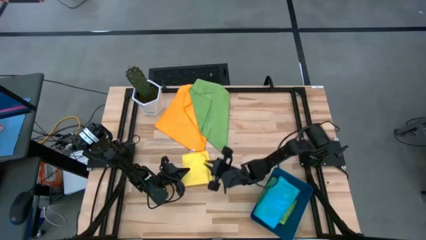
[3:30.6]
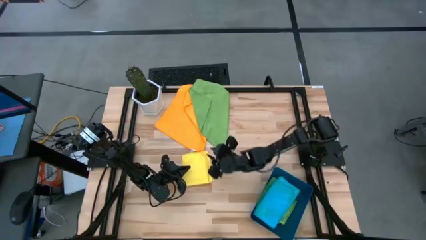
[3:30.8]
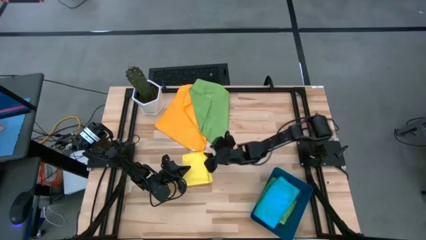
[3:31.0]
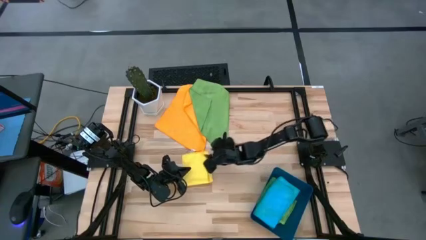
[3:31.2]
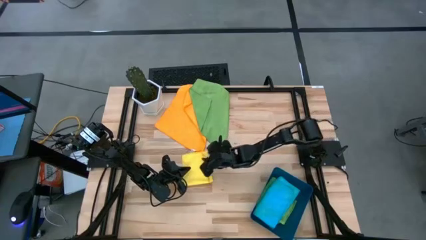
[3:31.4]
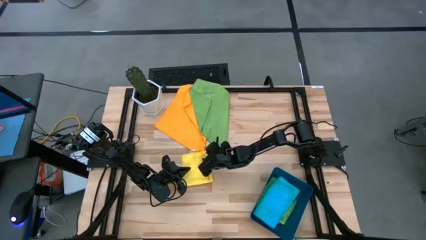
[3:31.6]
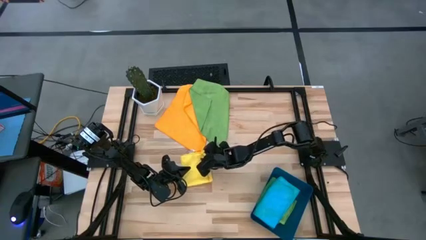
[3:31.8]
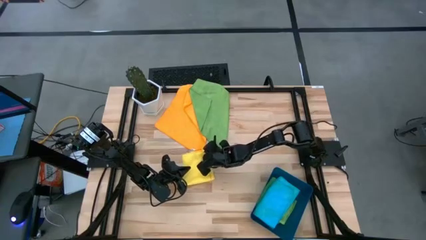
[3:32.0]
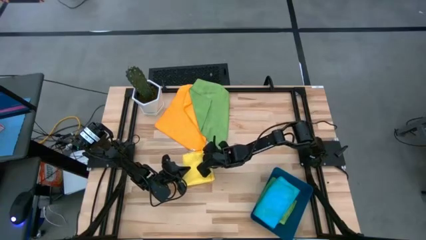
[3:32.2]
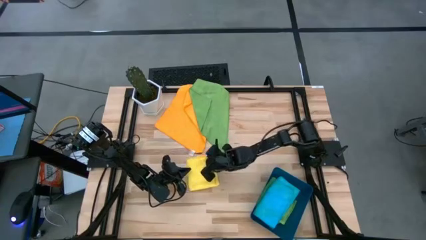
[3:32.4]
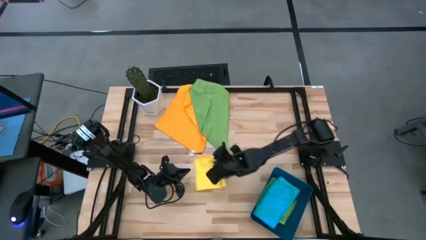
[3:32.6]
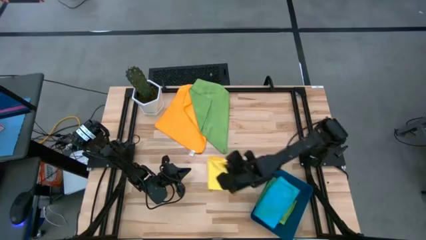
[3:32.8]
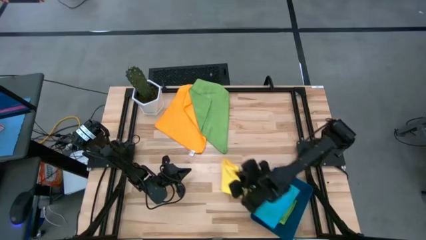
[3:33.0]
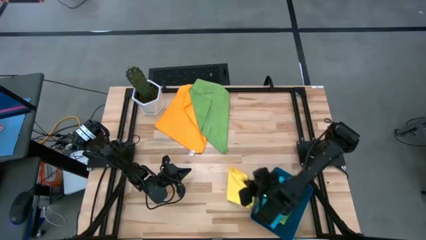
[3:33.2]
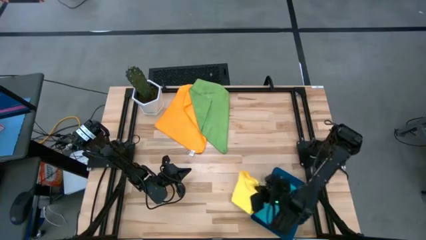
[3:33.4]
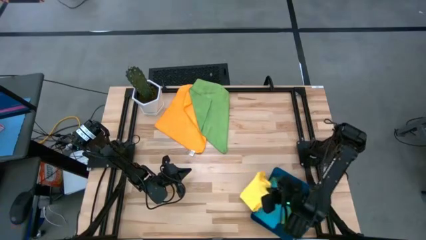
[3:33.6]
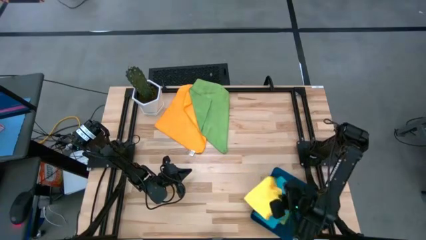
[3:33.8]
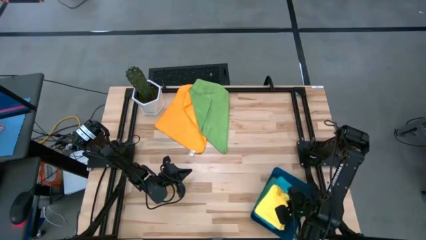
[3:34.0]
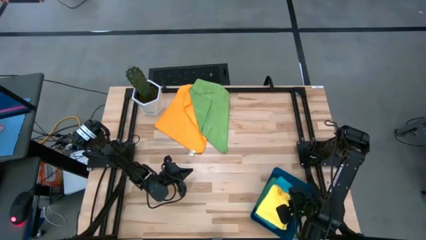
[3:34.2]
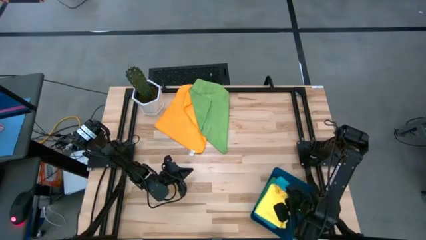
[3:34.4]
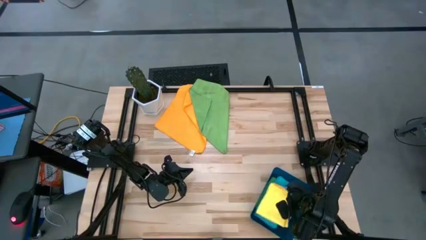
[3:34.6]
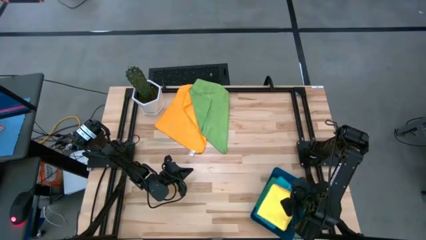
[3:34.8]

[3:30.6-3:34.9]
Task: Fold microfiber towels
Put the folded yellow microfiber towel into the blue bin

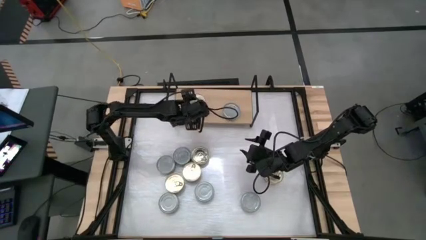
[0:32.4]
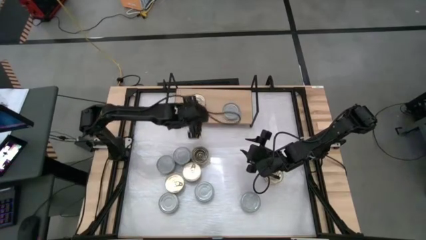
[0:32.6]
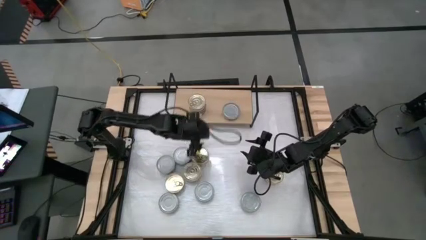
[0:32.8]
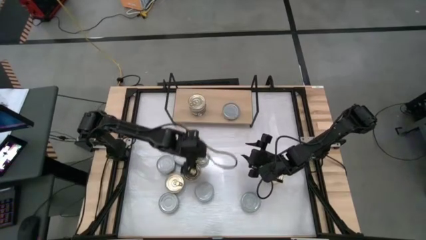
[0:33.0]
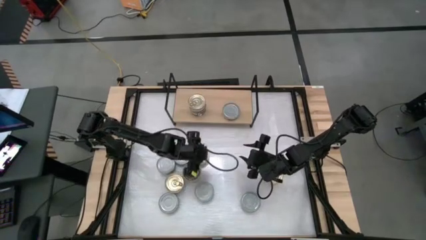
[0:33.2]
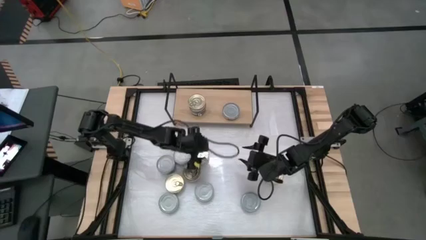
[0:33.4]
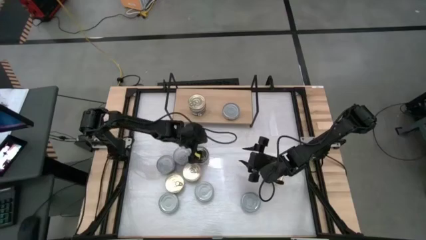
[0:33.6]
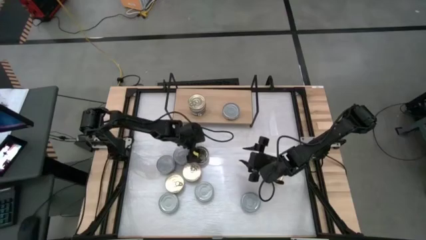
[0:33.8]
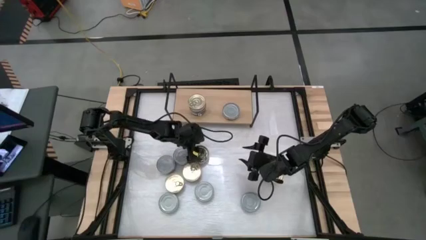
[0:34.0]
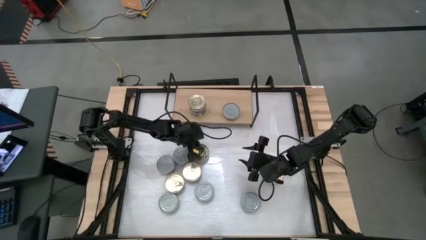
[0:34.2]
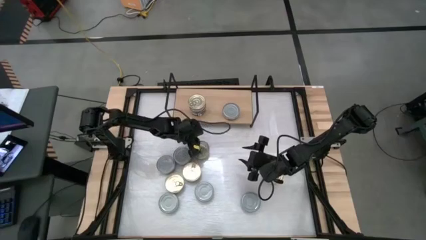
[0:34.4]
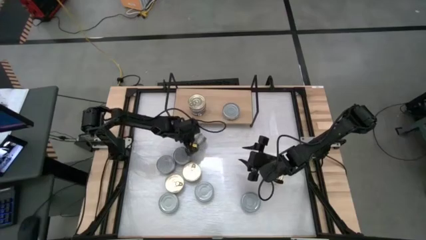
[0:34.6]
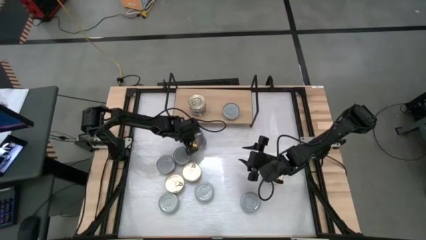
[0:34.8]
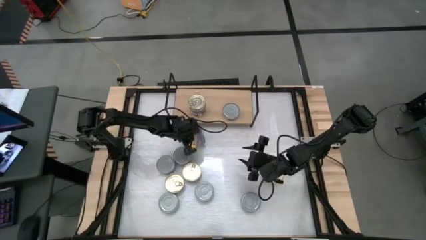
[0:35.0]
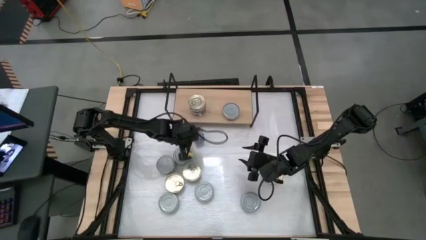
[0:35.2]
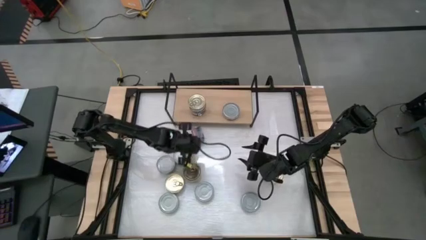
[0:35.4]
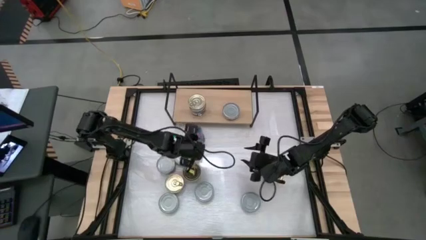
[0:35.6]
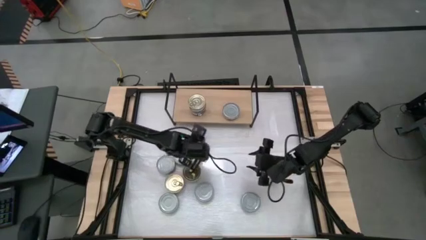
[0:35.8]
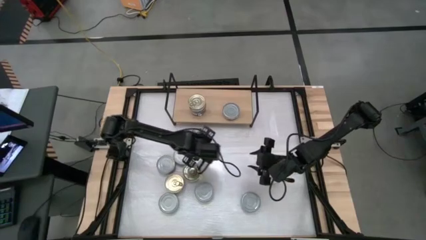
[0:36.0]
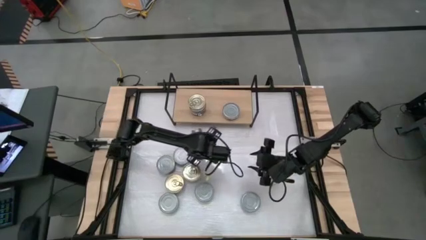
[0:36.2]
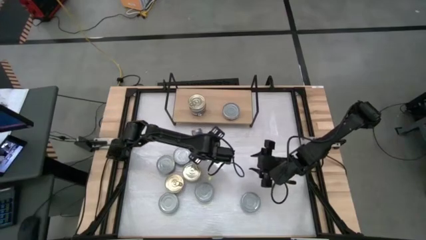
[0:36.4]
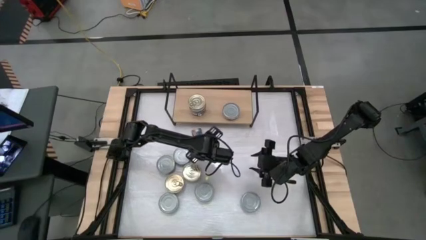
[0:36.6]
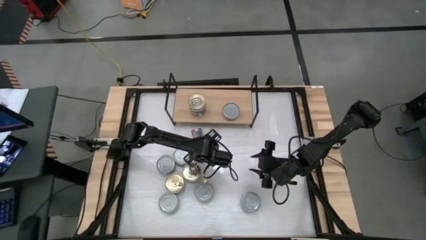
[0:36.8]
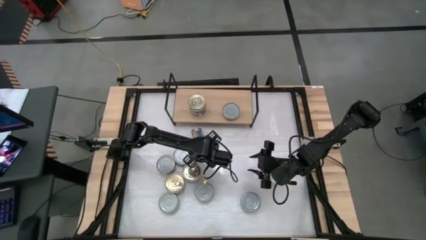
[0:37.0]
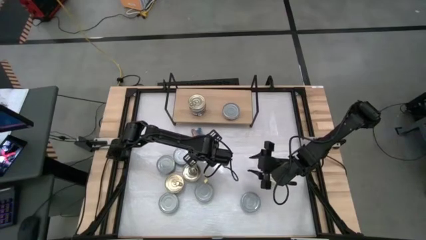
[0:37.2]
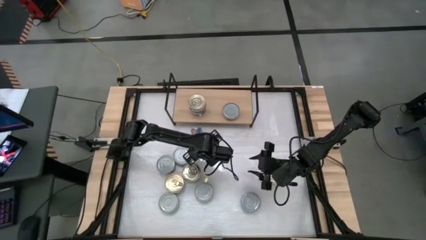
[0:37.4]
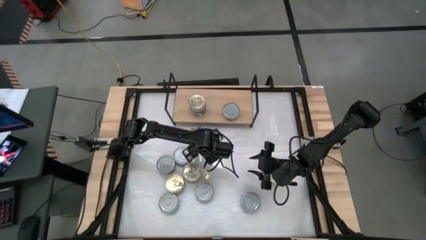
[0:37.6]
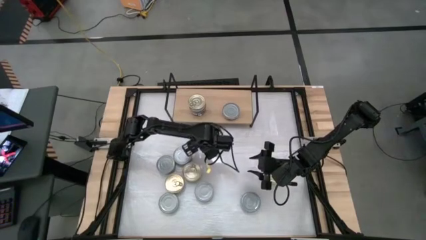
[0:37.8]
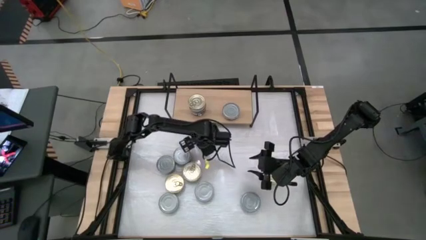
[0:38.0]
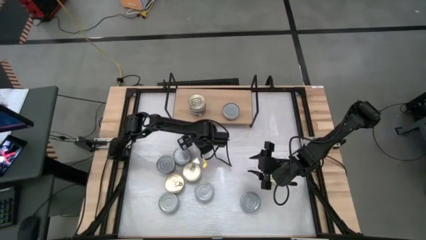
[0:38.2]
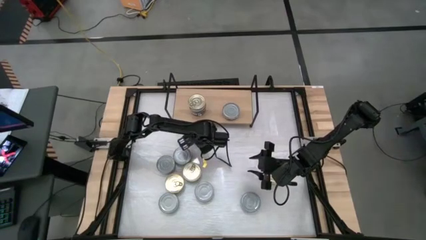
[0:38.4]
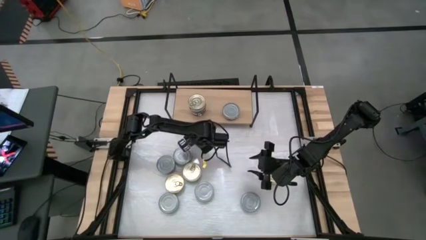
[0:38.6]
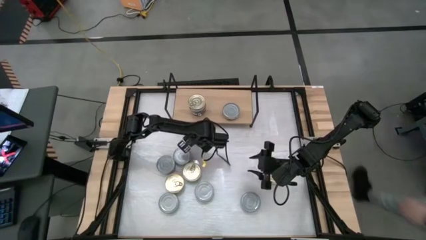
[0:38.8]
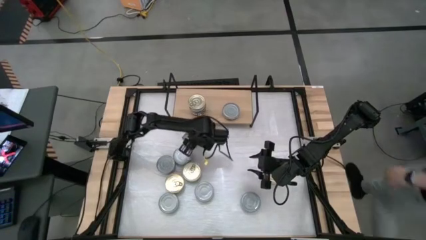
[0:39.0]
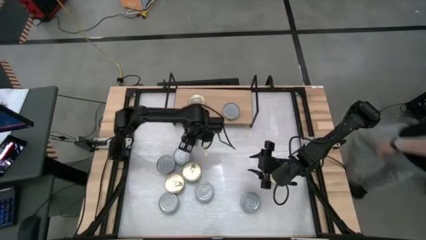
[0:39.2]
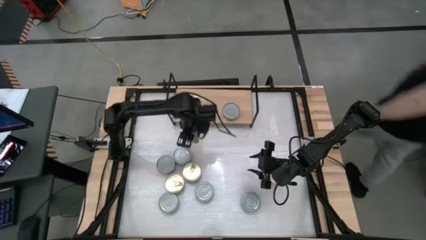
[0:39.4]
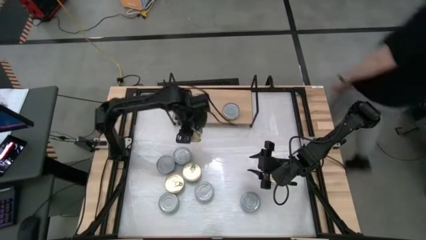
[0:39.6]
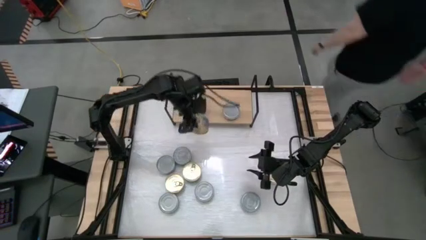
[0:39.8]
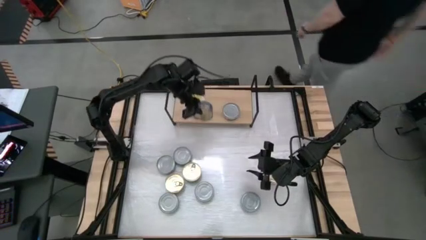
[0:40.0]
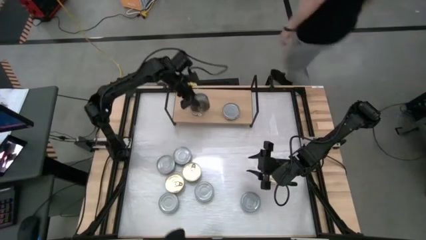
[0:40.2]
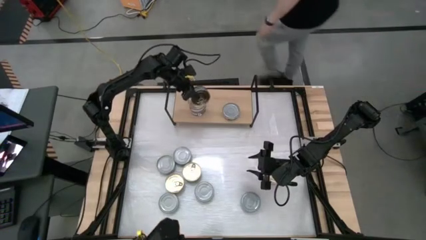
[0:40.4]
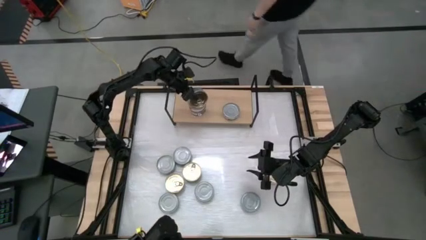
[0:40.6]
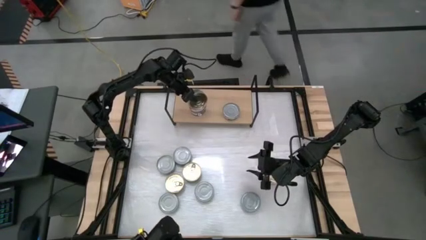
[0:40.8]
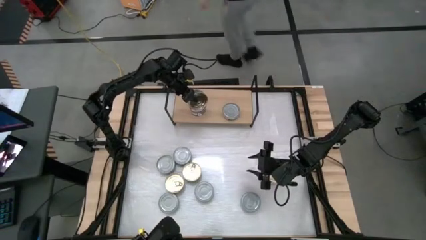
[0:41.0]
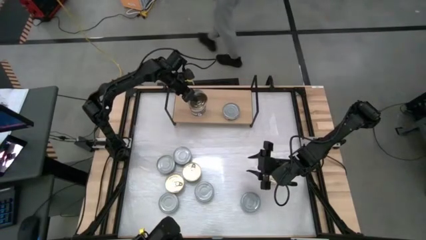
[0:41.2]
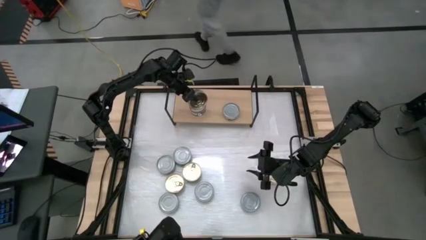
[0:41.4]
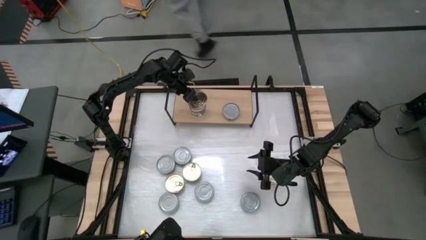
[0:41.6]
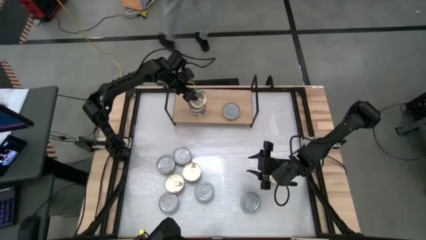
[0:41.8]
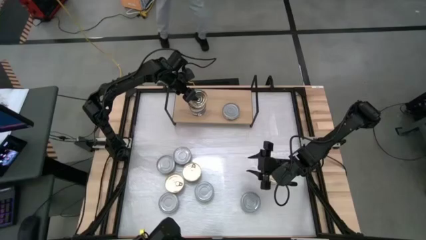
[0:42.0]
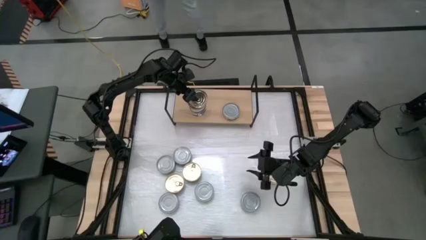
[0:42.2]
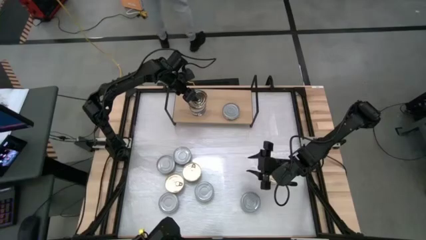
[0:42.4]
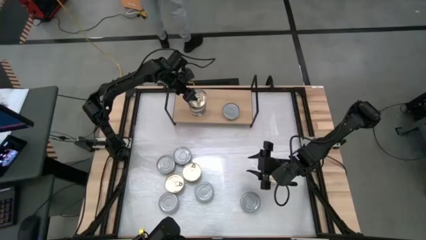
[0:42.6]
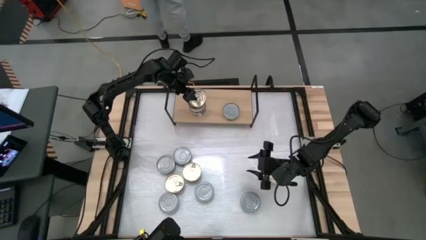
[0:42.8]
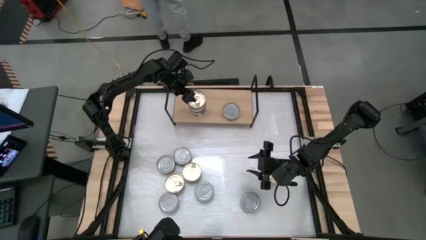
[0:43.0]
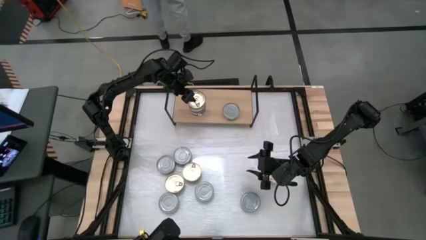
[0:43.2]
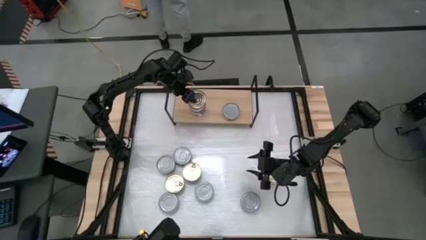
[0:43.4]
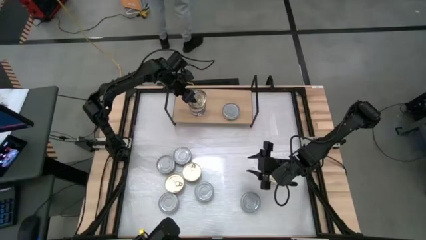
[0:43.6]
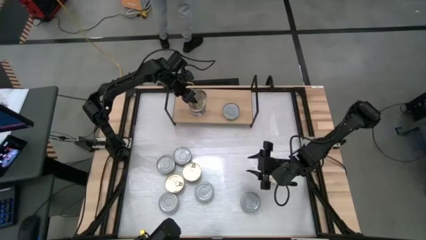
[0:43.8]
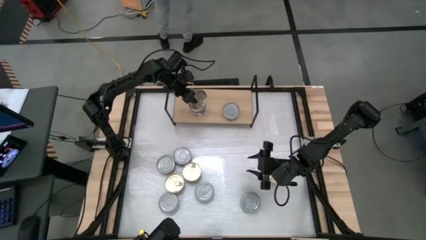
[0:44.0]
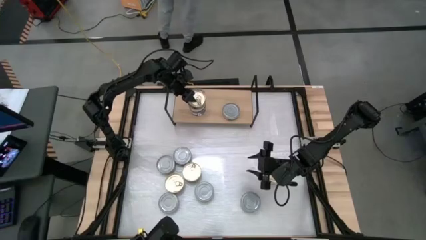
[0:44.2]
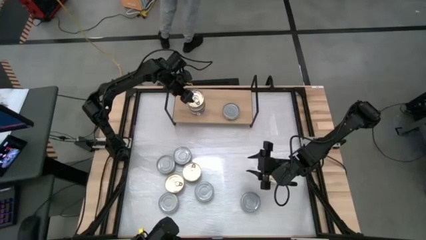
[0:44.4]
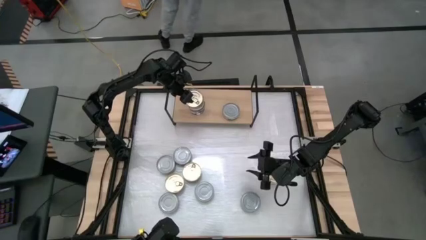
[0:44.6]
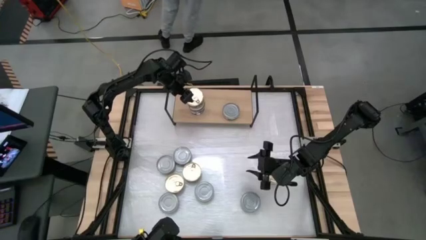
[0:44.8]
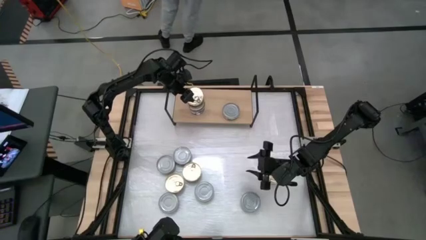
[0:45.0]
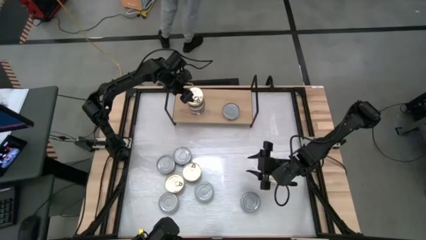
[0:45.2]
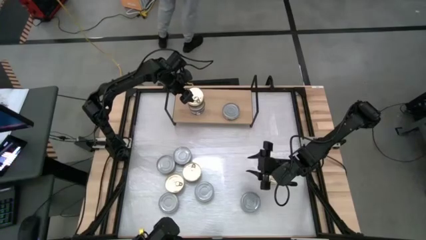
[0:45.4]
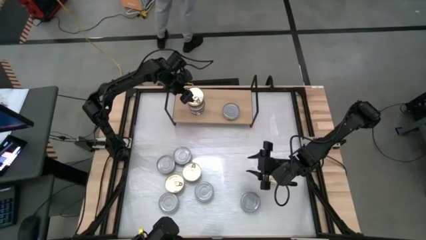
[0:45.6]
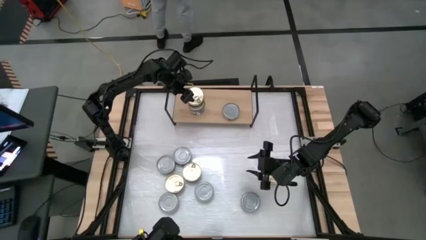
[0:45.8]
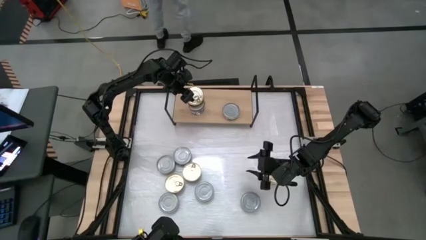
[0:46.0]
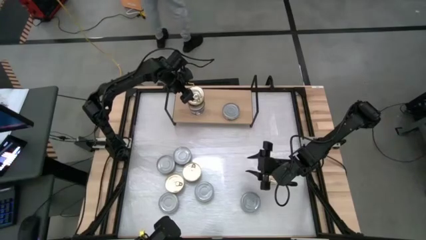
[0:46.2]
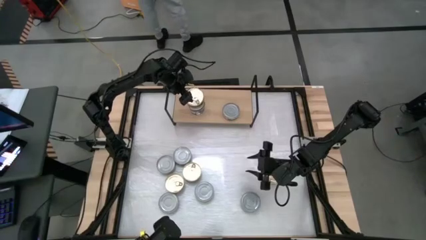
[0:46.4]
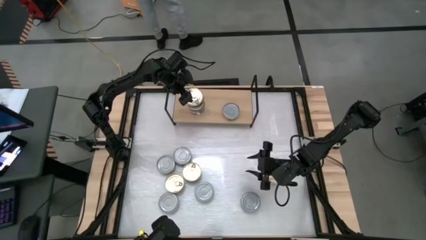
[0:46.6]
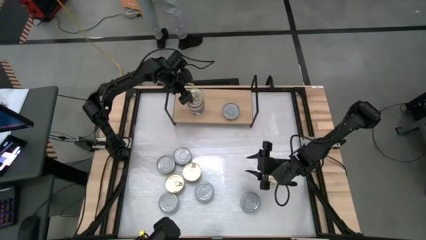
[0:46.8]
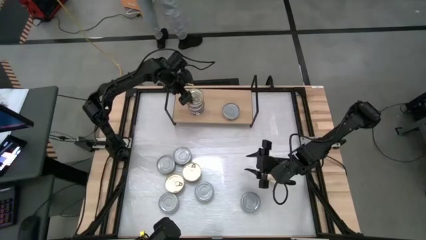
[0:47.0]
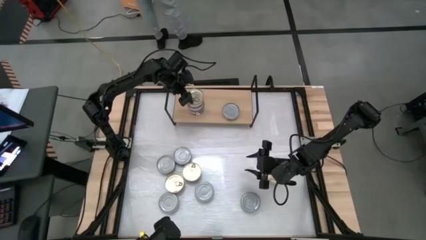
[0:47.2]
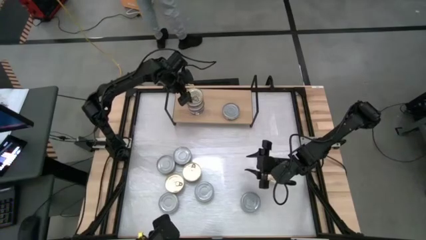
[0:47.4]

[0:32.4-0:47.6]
Task: Stack canned seafood by type on shelf
Stack the blue-pink tuna can on top of the other blue-pink tuna can on the shelf
